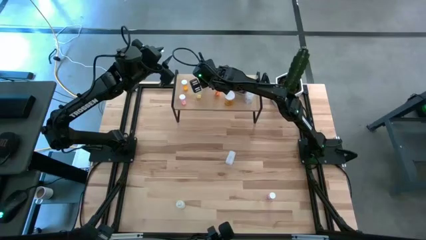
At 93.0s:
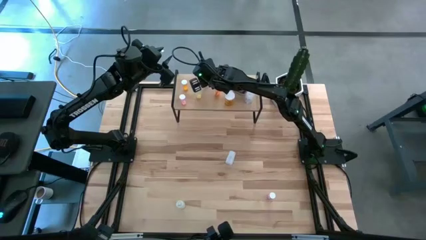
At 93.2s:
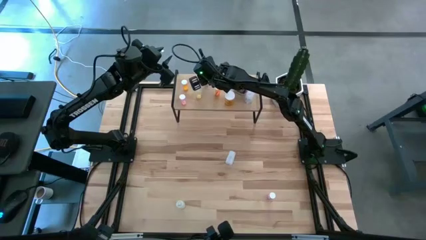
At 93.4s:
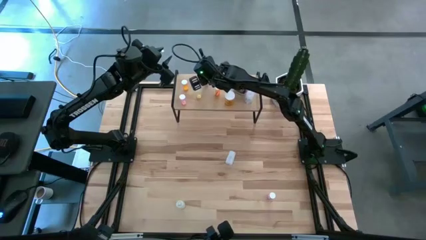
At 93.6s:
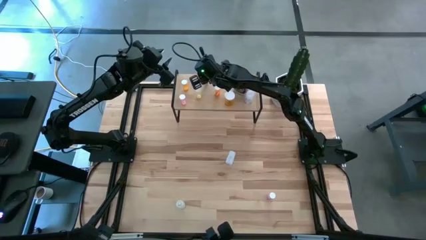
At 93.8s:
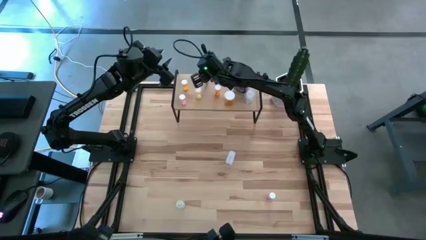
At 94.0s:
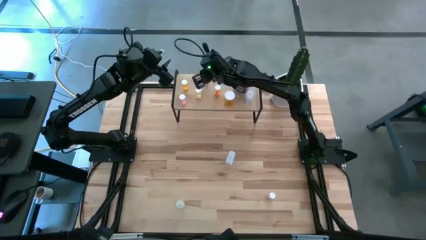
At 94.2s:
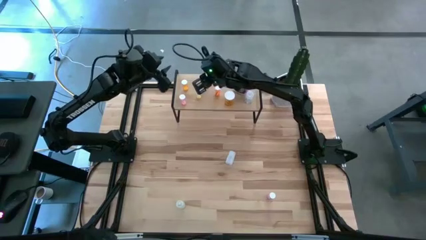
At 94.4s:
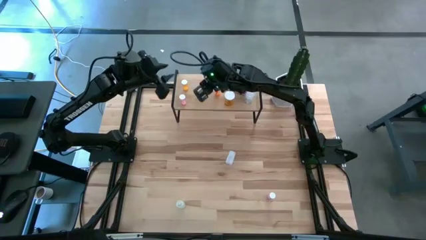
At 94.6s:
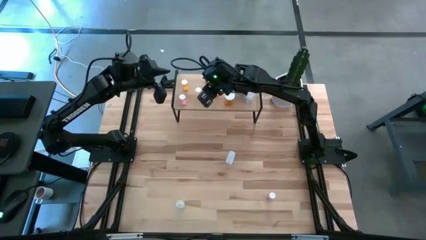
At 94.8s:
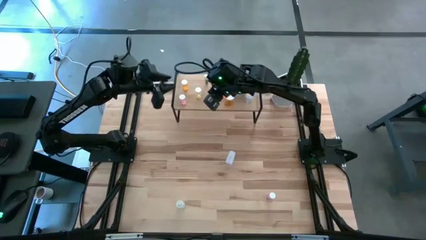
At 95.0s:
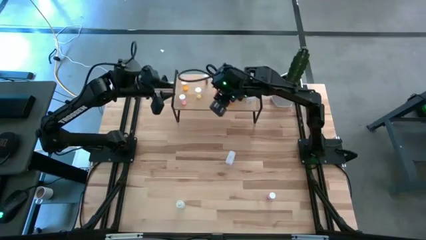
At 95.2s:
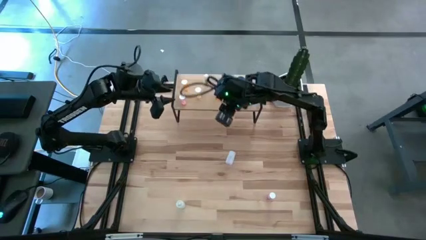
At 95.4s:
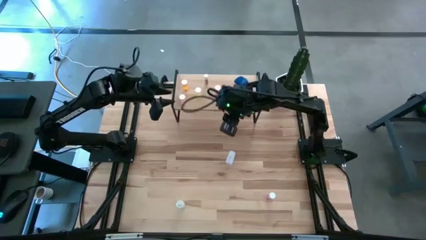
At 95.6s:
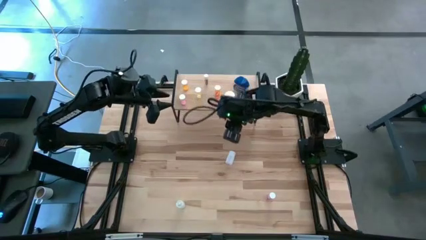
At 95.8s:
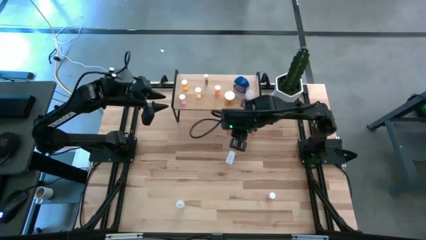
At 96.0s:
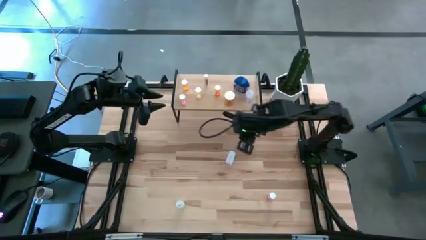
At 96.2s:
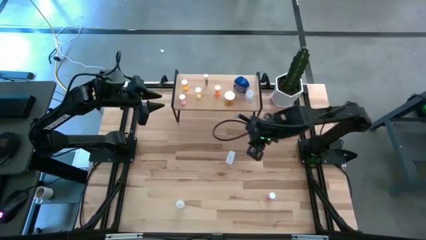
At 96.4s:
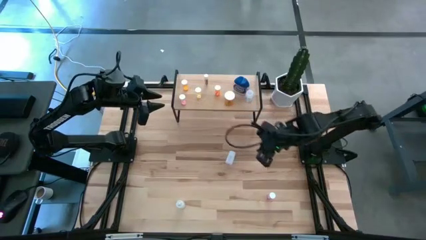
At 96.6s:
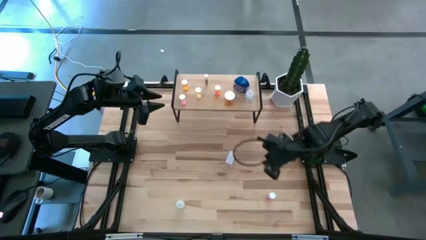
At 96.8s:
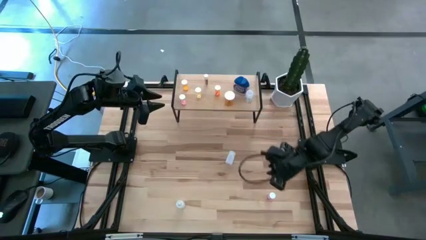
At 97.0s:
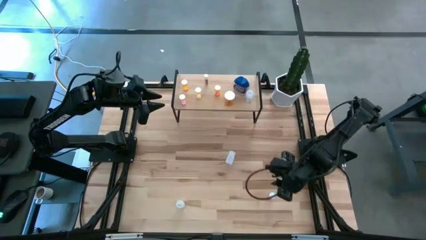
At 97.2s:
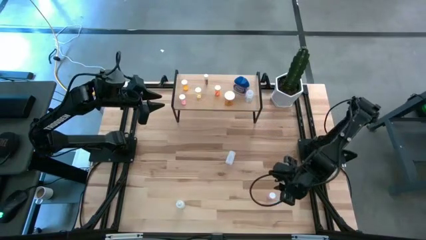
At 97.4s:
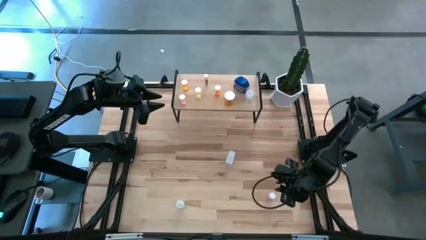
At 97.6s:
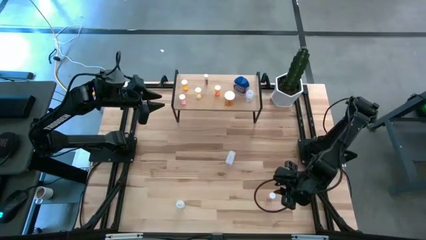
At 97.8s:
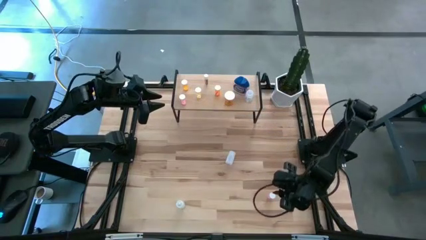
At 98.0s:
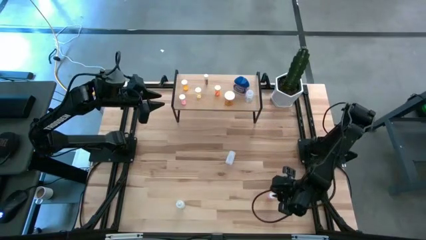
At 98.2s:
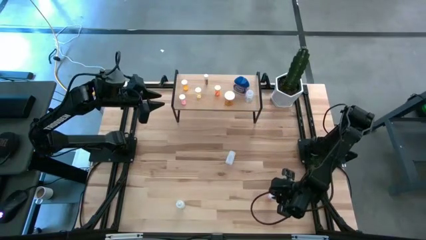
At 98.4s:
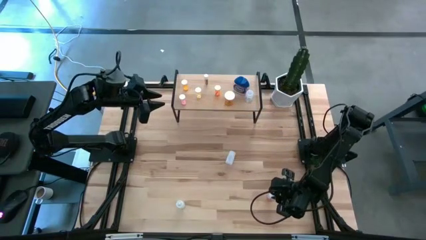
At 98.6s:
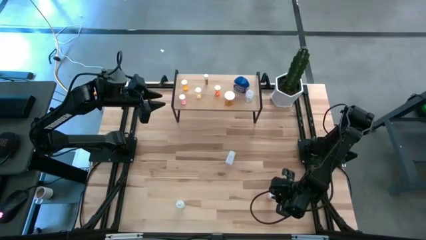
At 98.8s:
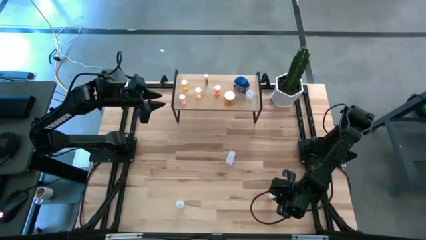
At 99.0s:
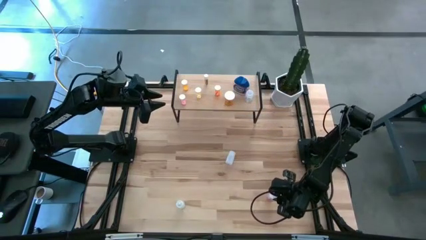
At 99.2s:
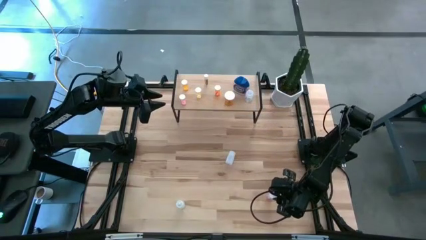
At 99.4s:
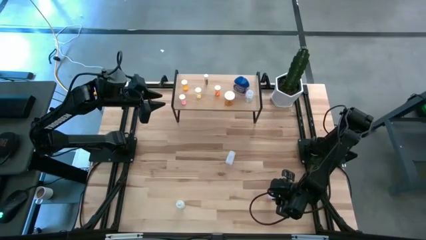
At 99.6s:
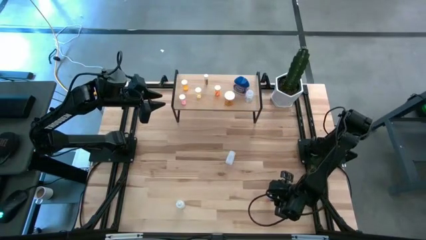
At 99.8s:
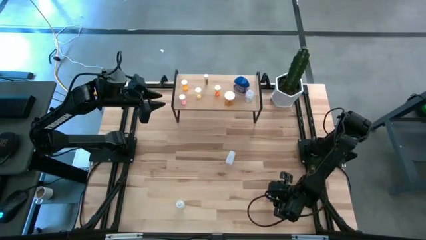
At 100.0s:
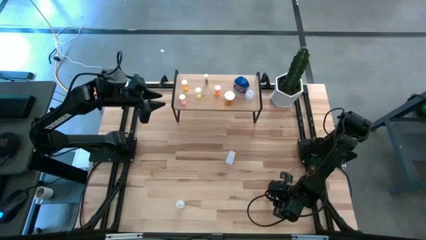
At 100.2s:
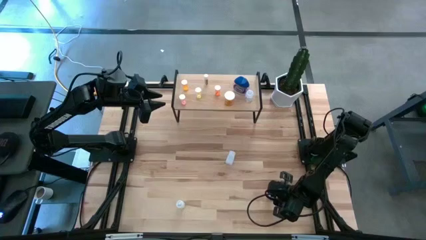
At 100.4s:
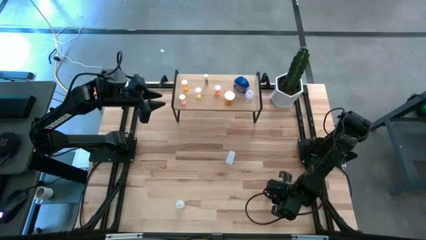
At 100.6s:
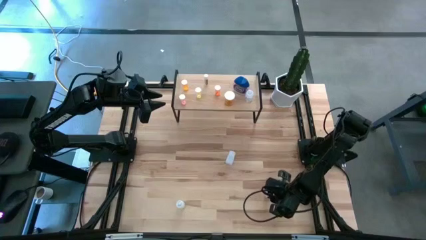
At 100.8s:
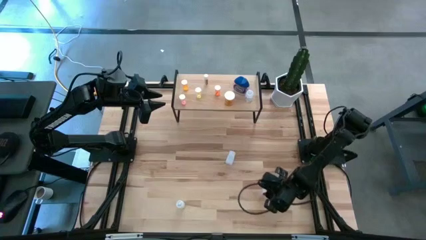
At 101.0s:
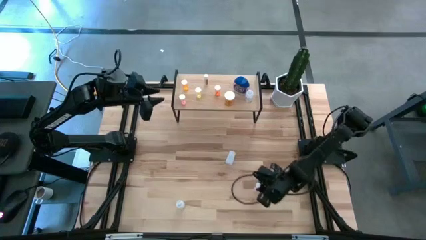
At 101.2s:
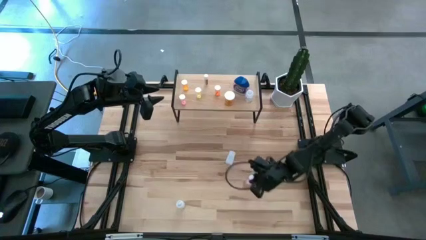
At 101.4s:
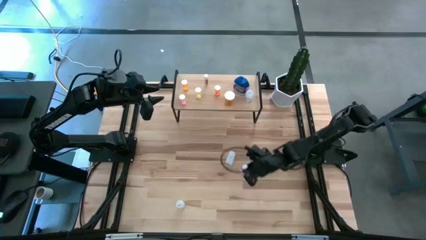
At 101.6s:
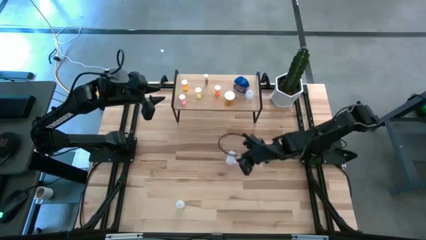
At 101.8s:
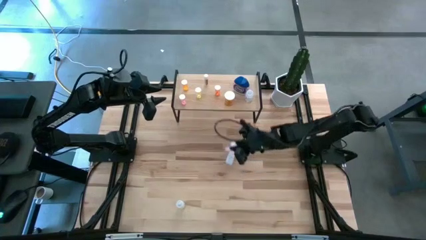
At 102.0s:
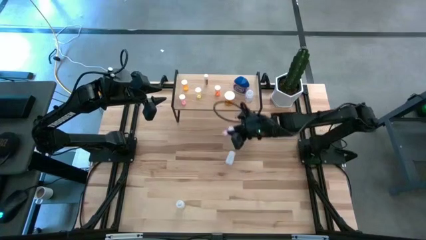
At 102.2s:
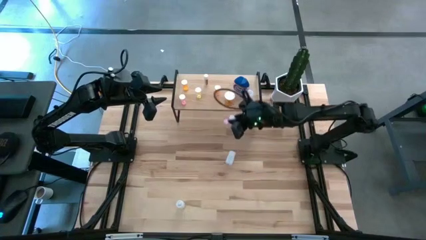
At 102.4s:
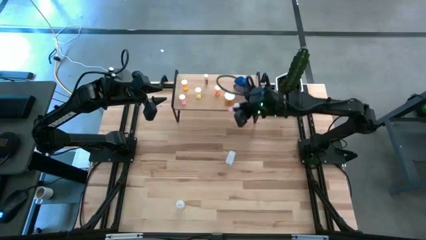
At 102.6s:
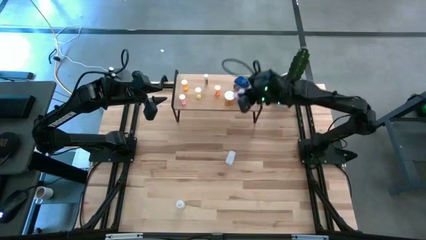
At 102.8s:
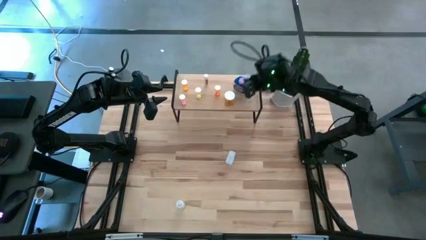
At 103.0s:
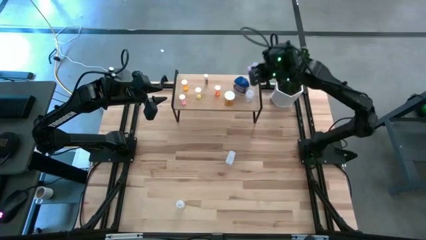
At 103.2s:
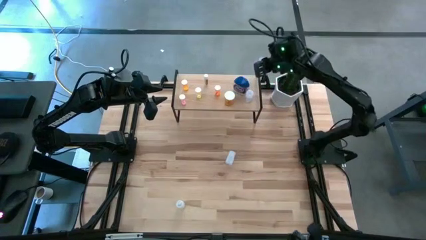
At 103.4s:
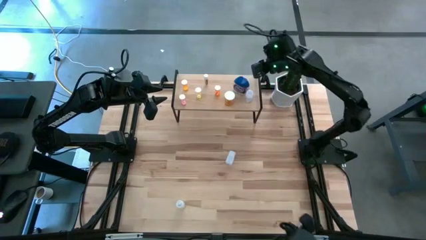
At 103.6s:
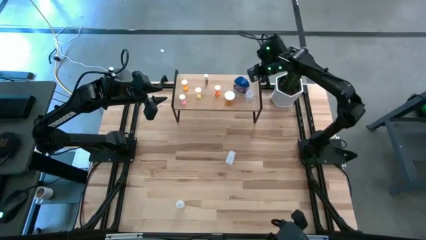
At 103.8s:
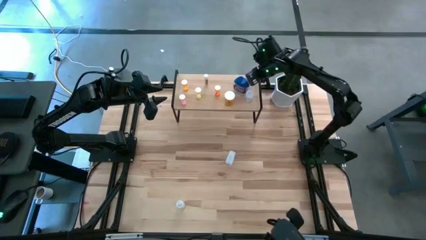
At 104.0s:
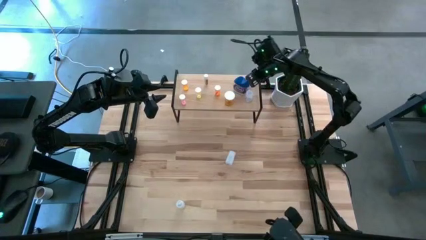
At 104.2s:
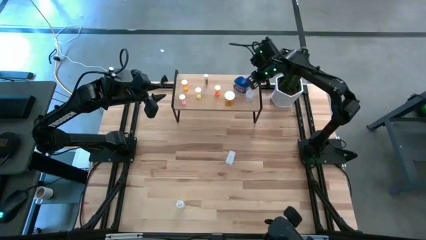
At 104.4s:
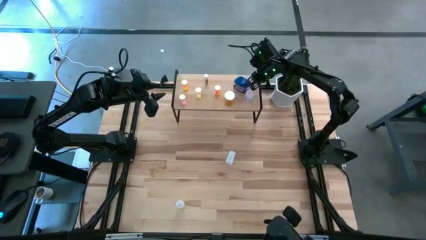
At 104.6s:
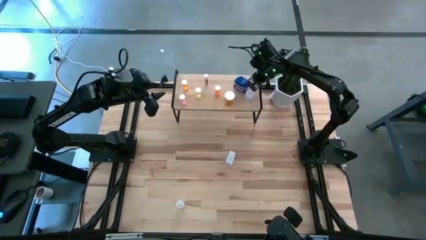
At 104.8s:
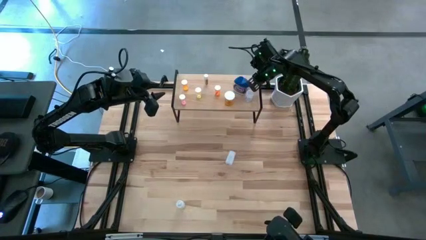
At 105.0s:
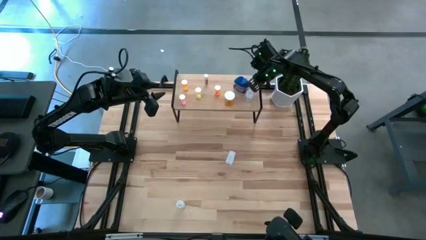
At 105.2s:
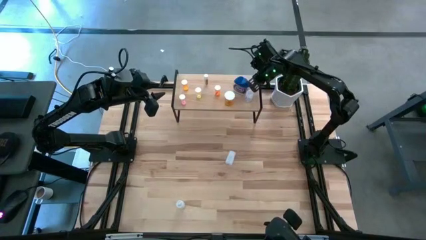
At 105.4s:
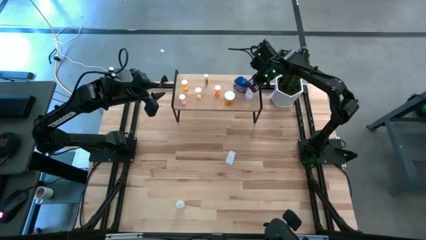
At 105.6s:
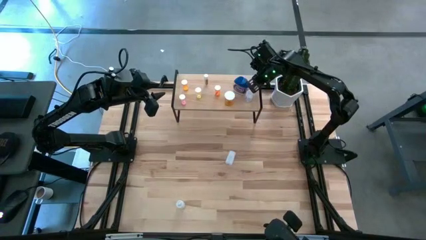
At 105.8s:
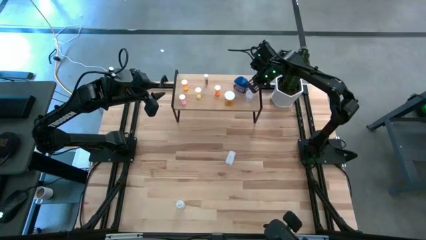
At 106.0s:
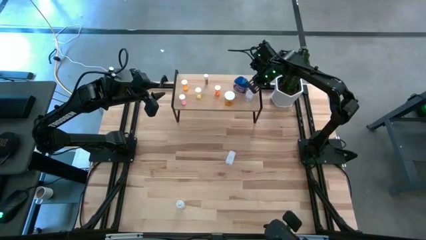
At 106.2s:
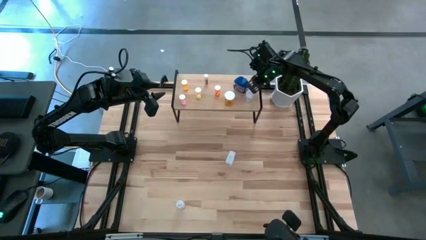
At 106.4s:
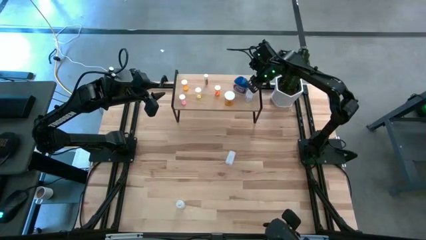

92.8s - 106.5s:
Task: Pick and place medicine bottles onto shelf by color
Put the pink pill bottle on the shelf

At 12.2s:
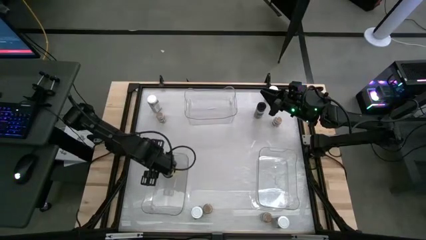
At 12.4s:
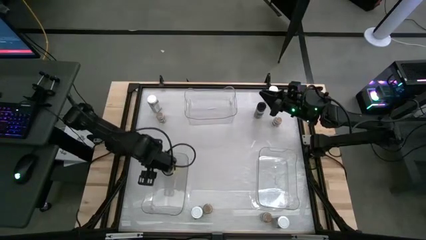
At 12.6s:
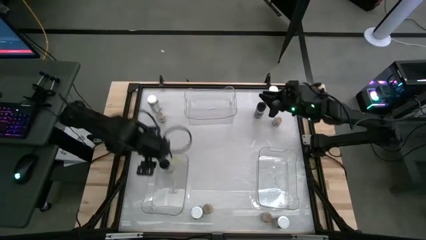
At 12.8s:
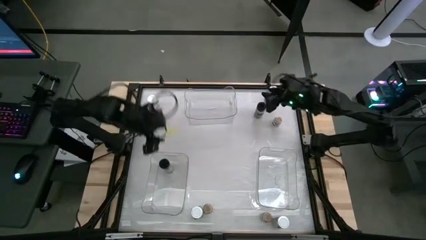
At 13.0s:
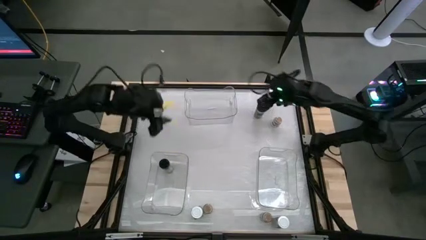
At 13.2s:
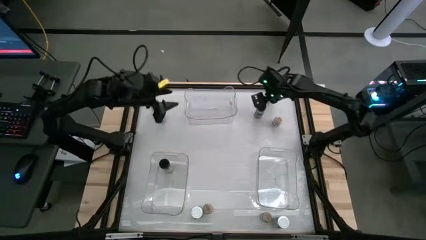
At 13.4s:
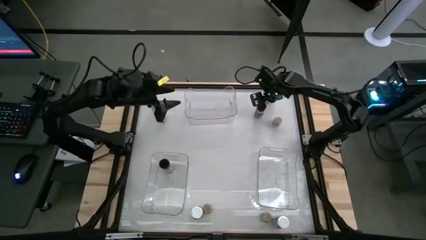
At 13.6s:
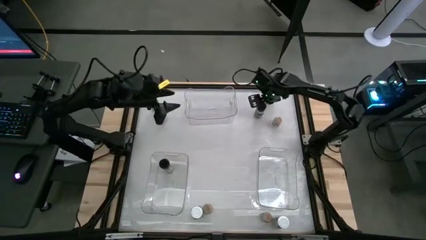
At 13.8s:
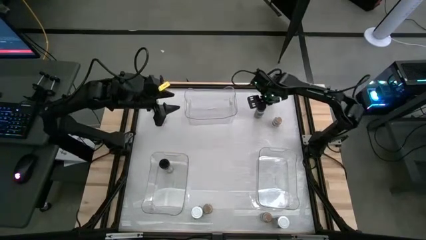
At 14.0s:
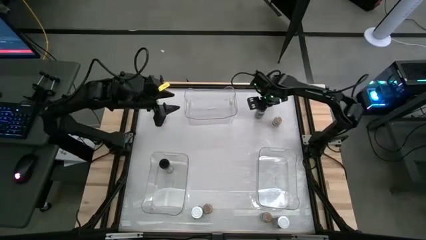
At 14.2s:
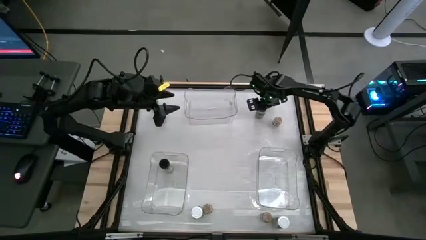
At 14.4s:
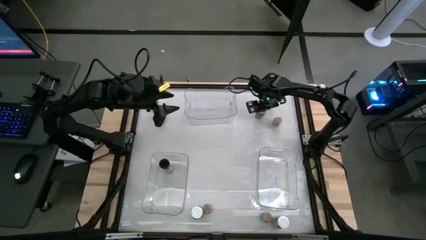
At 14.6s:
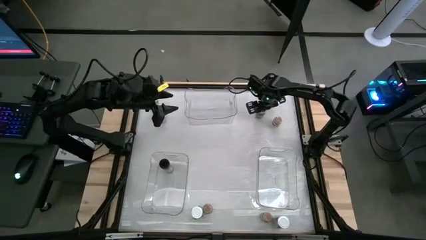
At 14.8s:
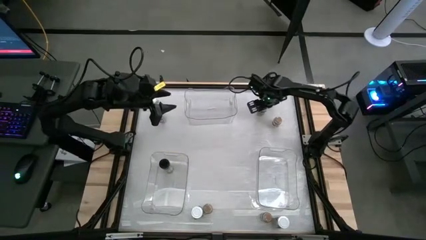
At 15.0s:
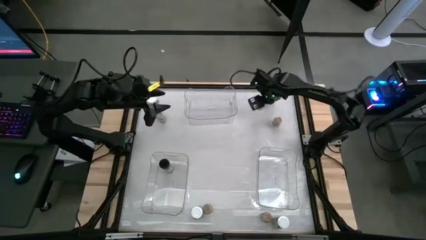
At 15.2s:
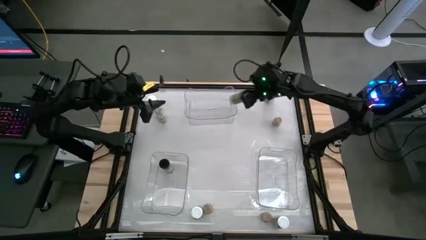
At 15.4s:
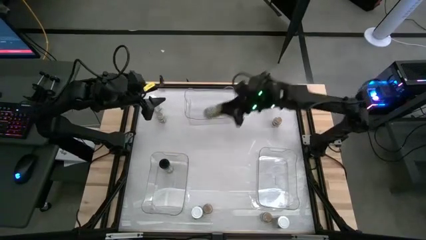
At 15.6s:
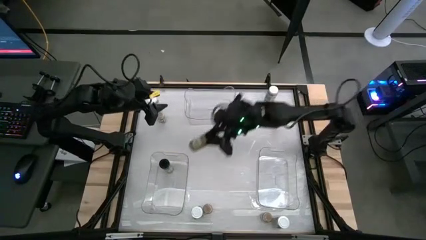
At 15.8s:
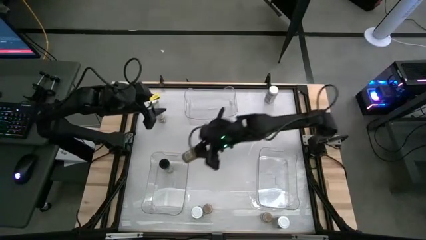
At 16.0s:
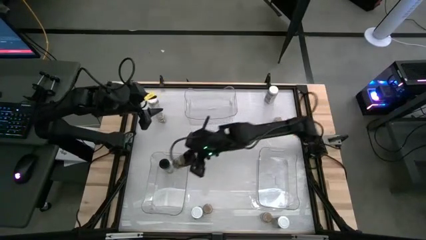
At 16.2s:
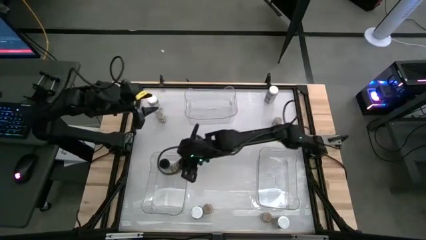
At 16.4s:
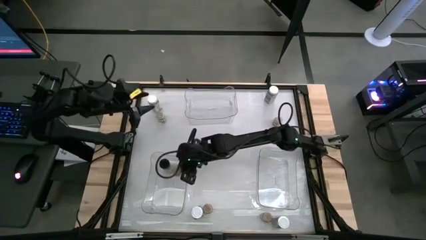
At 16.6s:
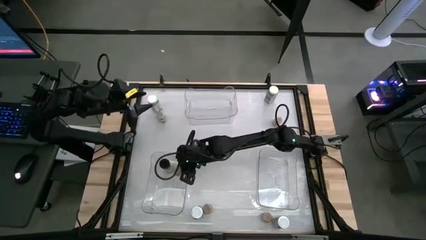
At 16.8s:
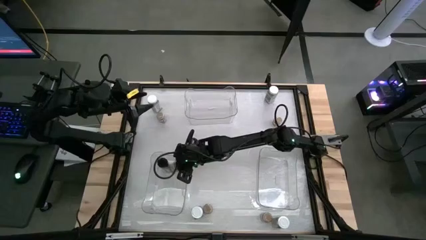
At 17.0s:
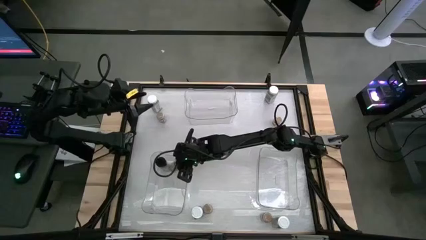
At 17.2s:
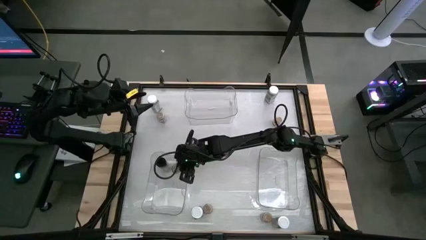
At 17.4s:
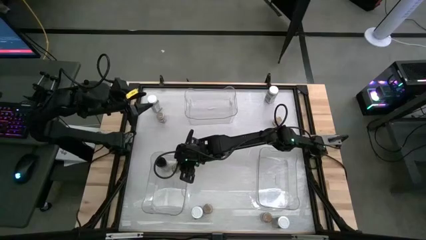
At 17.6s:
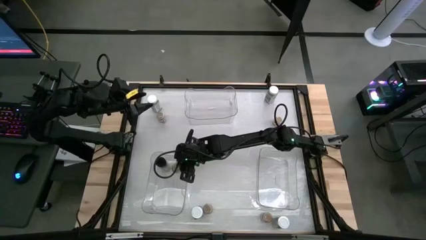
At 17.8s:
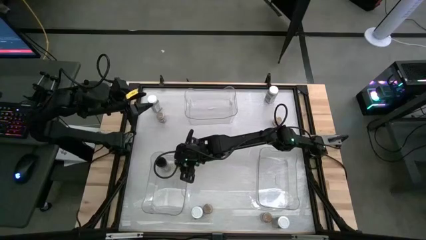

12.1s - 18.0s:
Task: Sort spices by type
Put the green seasoning bottle into the bottom left transparent bin
